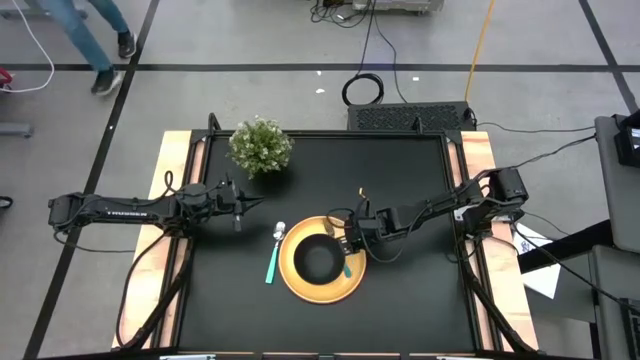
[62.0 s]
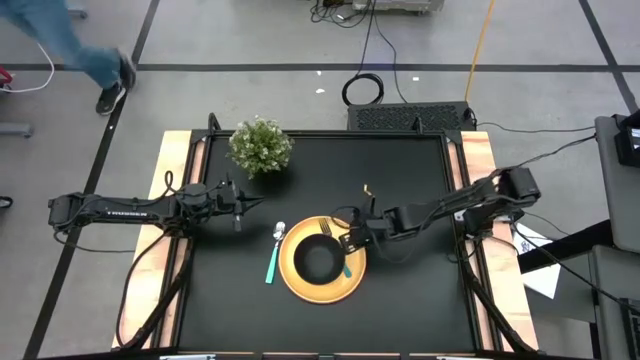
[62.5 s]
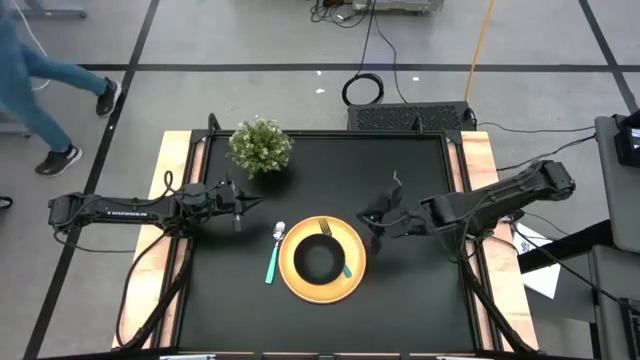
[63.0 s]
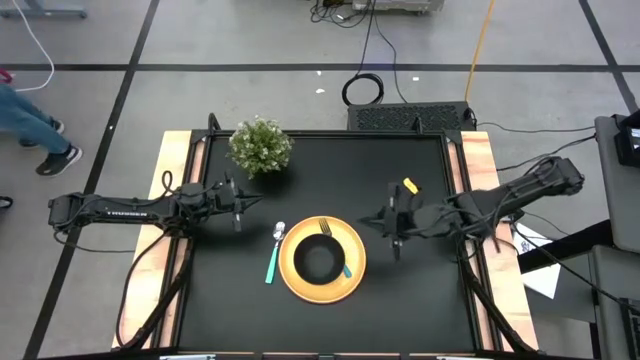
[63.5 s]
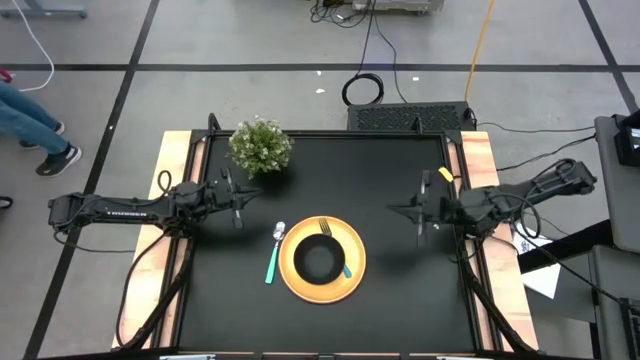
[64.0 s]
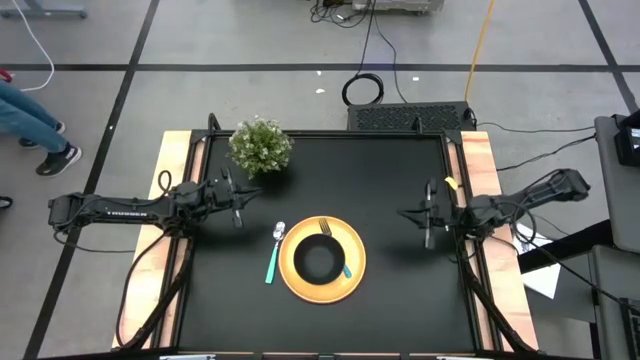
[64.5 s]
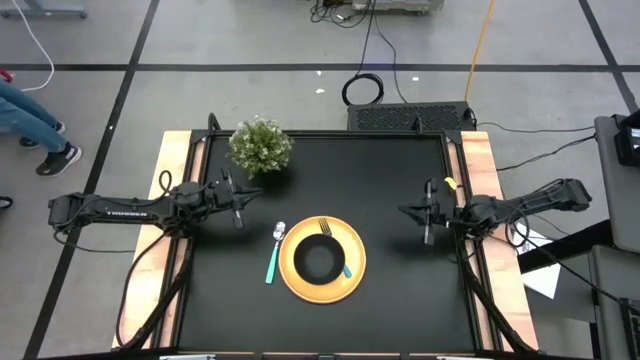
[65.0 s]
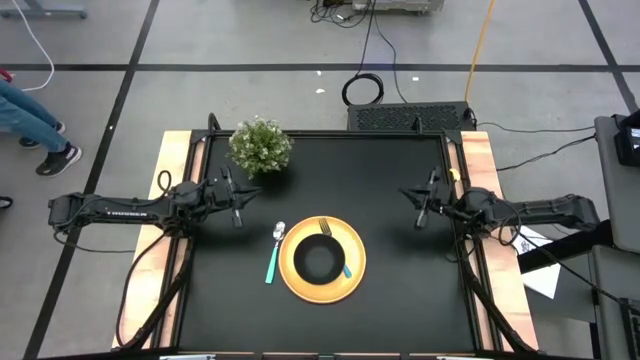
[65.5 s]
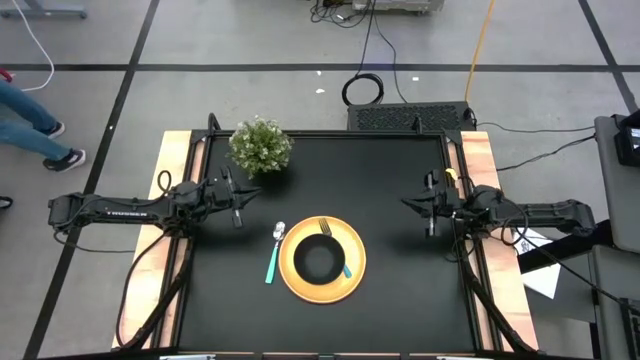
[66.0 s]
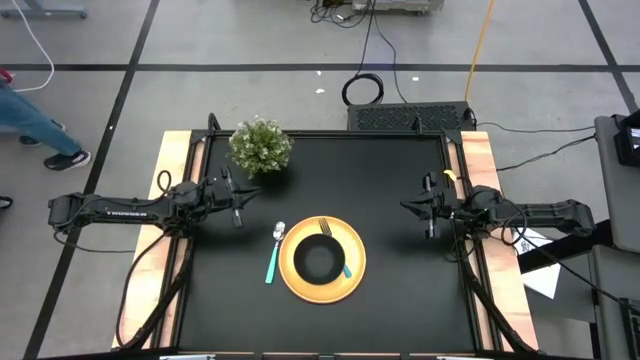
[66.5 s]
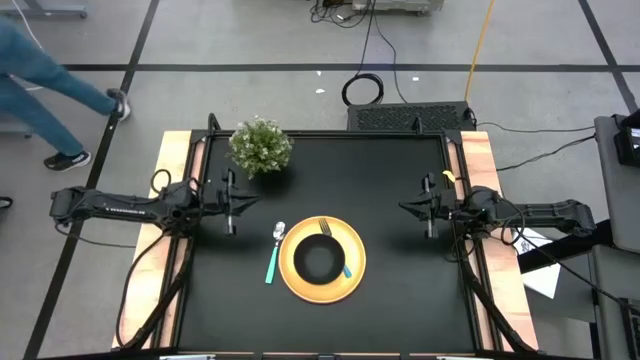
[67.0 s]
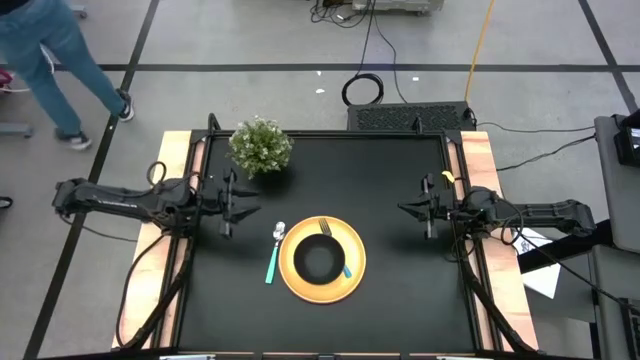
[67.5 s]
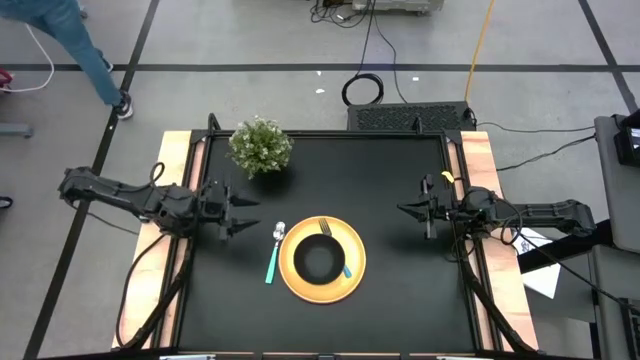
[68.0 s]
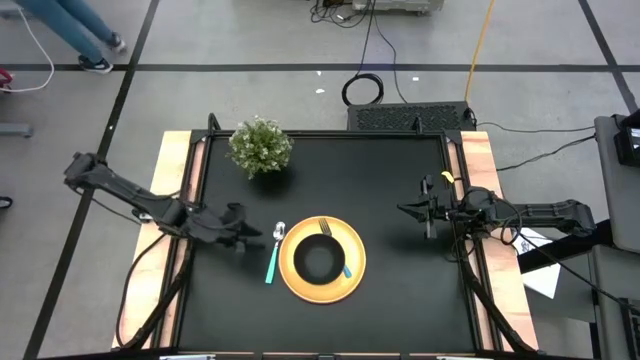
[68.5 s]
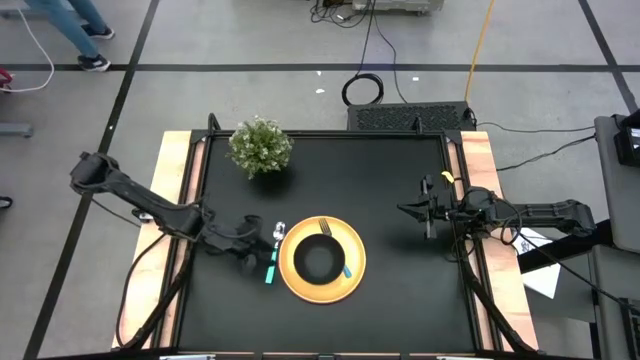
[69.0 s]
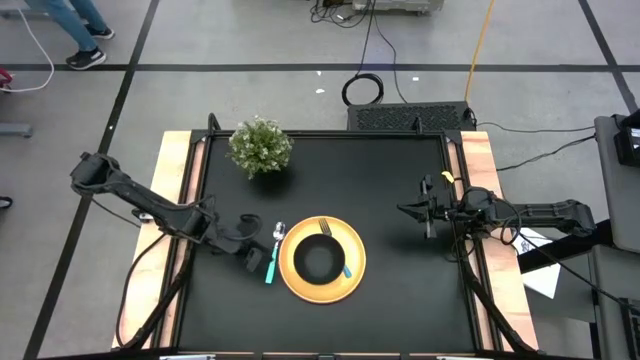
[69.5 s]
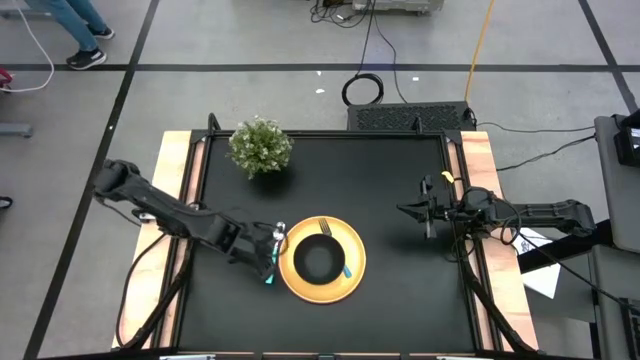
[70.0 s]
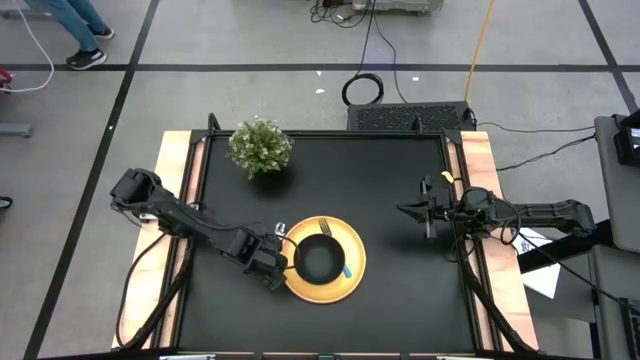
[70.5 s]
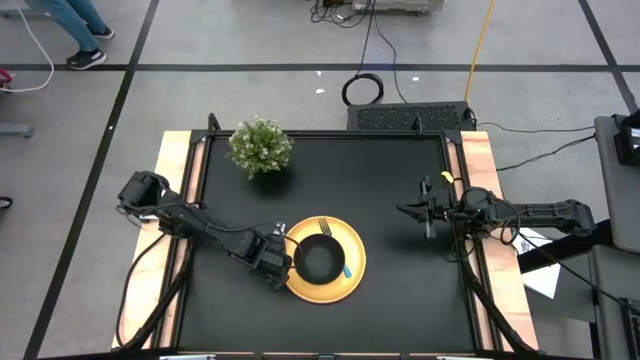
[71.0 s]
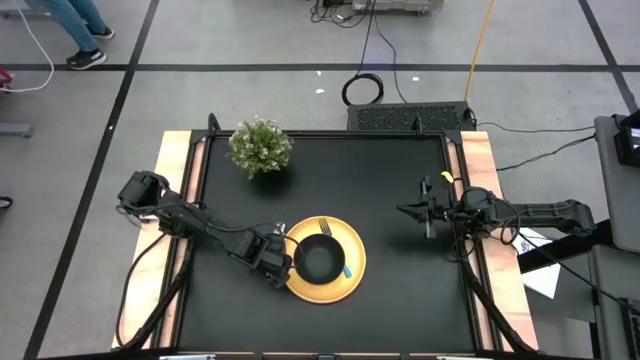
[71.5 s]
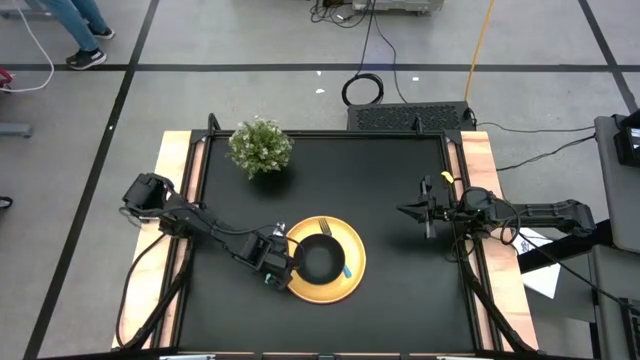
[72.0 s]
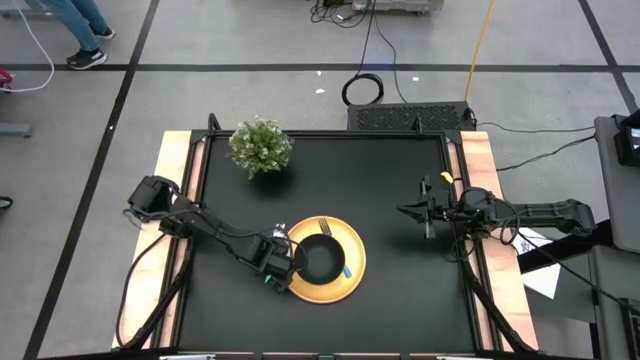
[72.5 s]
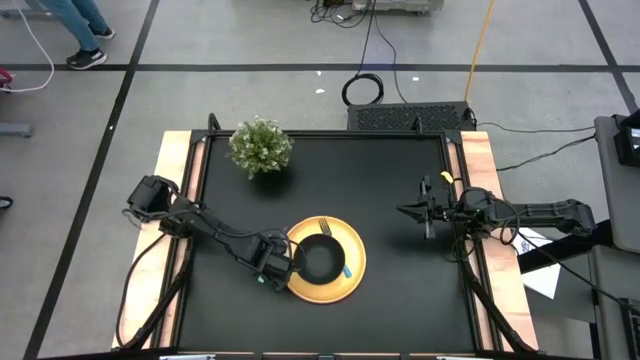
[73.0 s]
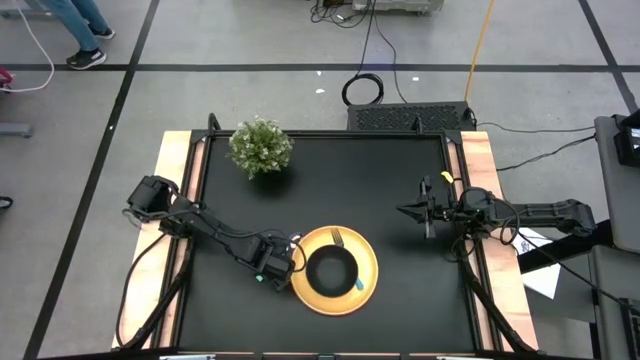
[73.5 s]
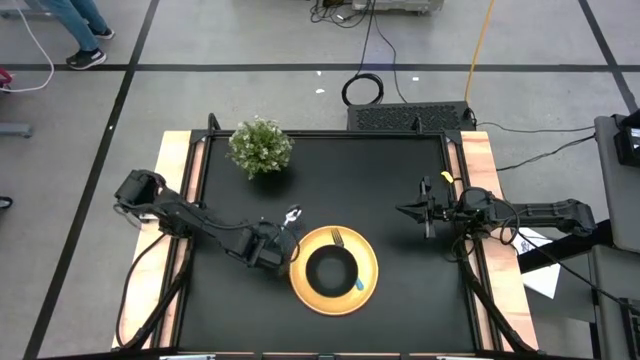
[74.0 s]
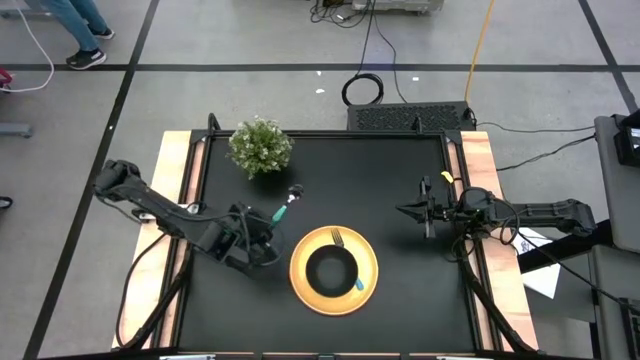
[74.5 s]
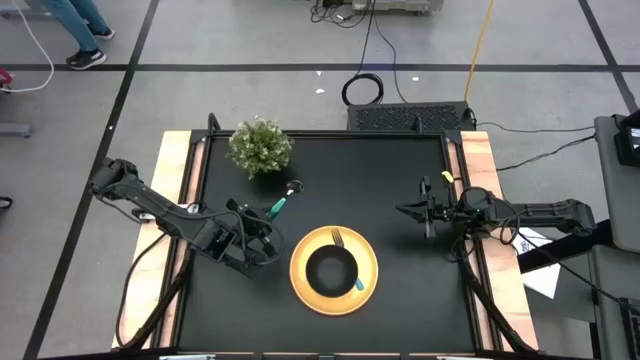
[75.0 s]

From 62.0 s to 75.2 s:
Task: Set table place
Put the blue spoon in the black bowl on the yellow plate

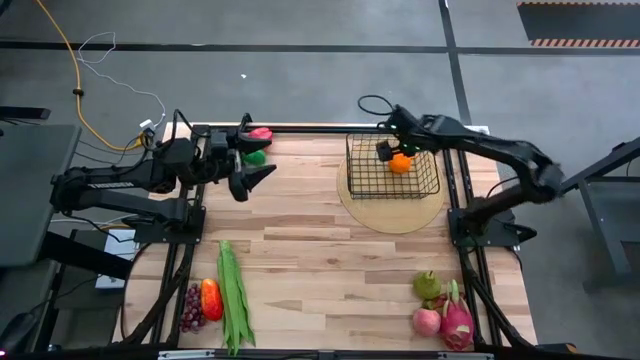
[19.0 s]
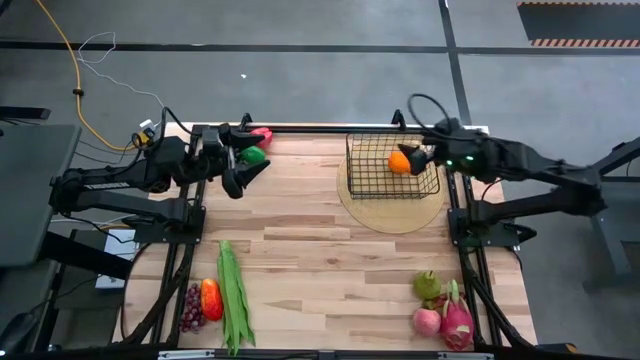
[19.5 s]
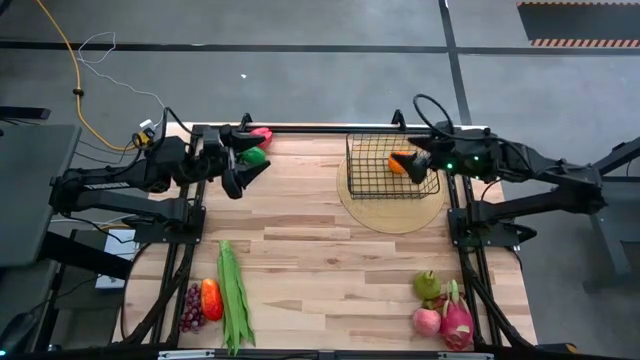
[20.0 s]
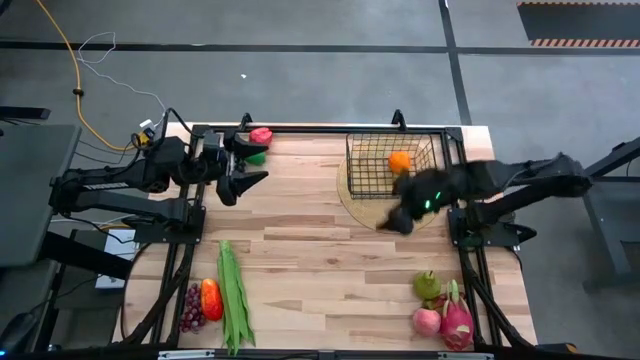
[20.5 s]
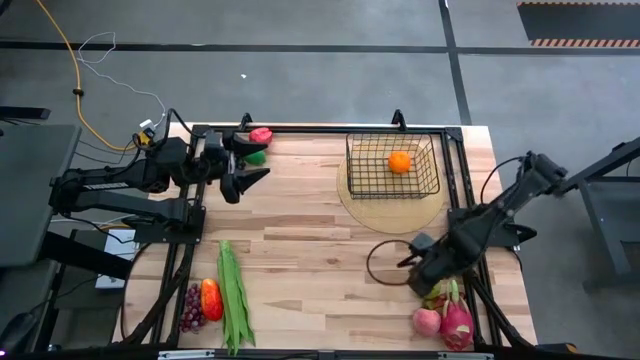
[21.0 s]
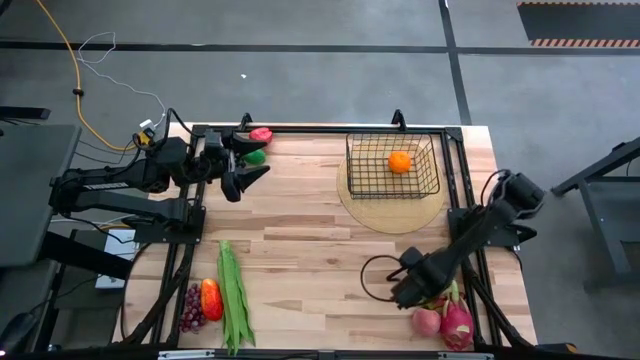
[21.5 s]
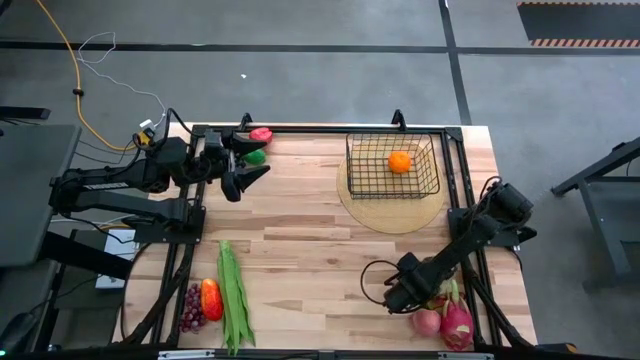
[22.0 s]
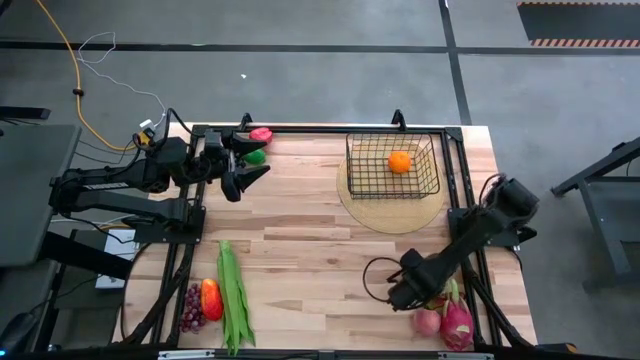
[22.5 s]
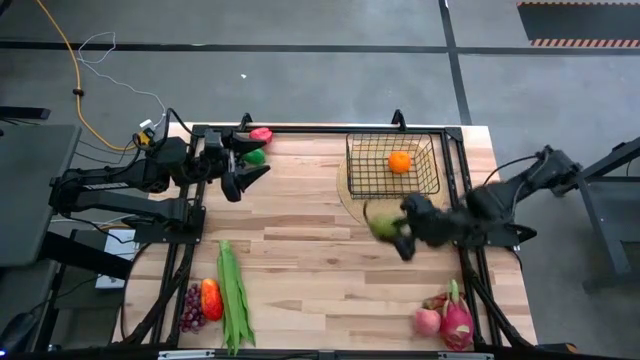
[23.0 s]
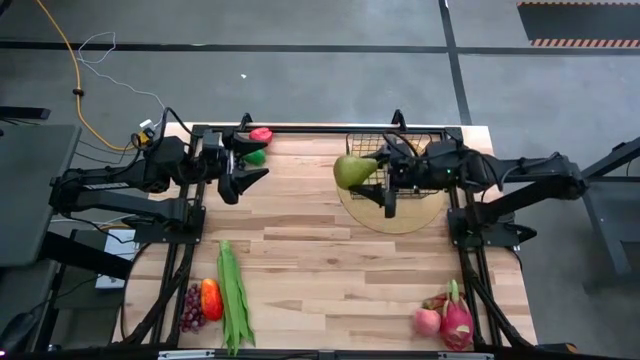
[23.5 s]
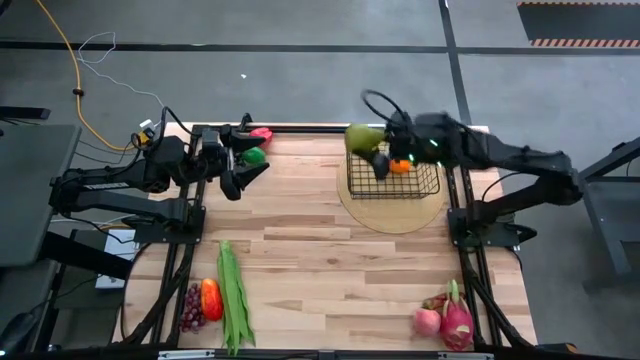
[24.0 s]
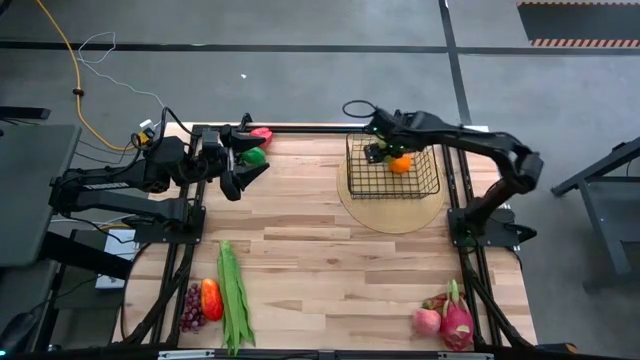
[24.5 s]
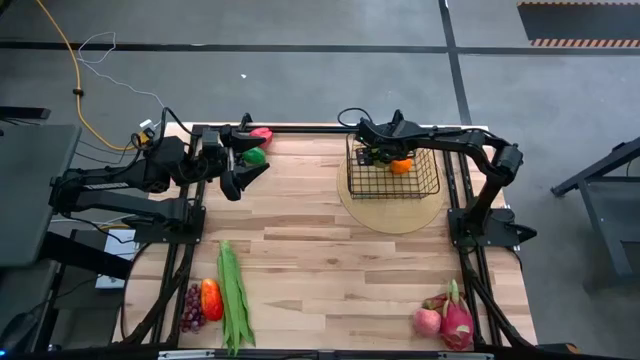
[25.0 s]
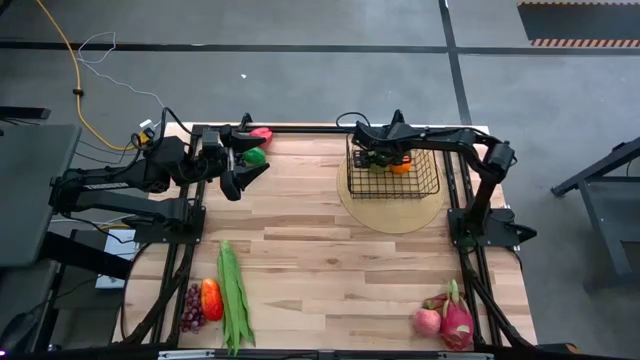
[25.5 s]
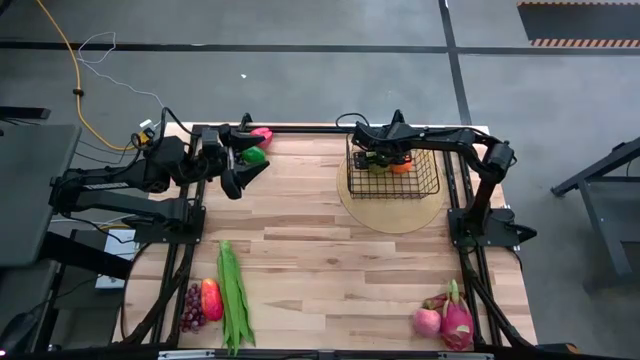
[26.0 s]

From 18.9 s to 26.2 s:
Task: Build produce basket
Put the green pear into the black wire basket
